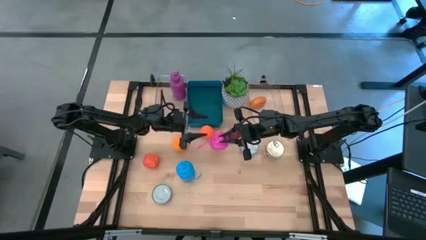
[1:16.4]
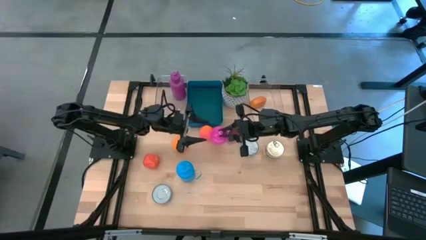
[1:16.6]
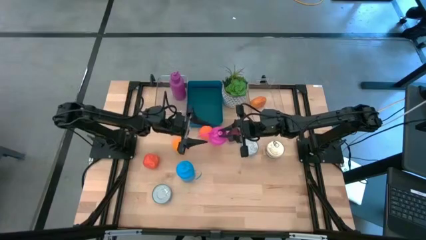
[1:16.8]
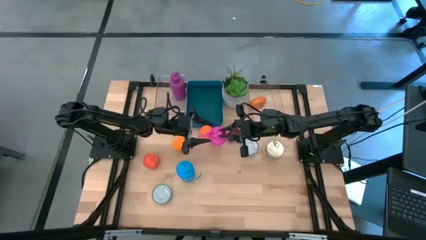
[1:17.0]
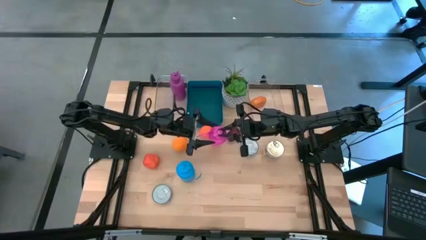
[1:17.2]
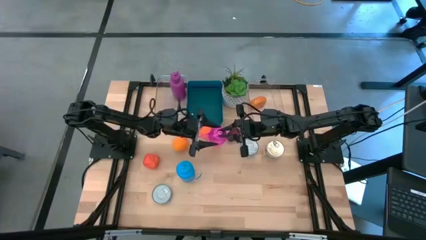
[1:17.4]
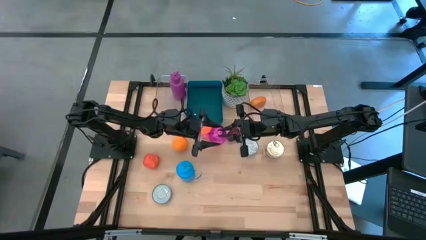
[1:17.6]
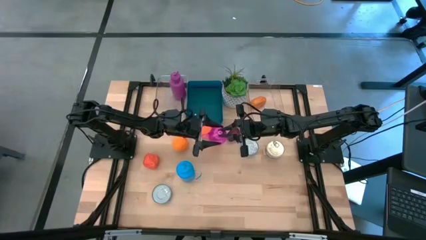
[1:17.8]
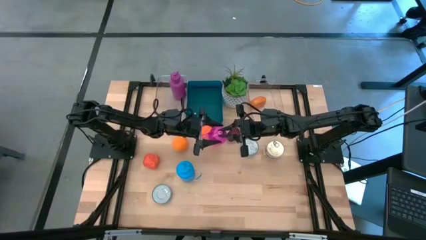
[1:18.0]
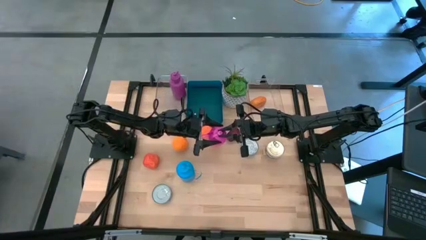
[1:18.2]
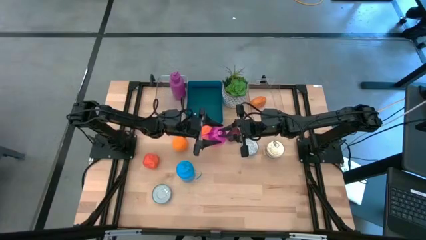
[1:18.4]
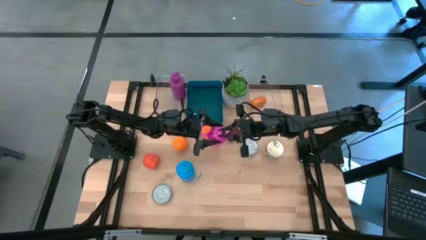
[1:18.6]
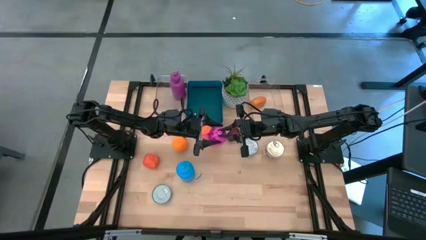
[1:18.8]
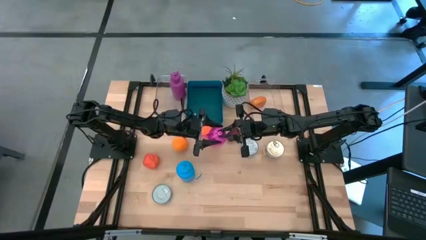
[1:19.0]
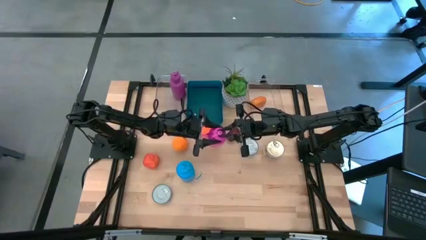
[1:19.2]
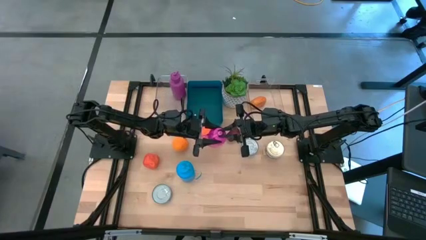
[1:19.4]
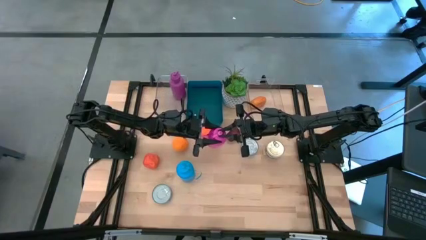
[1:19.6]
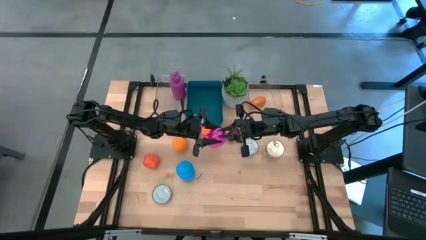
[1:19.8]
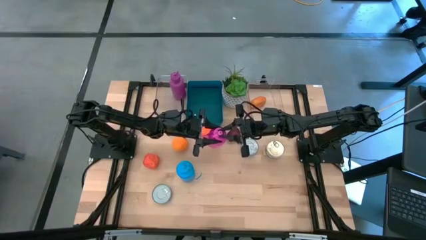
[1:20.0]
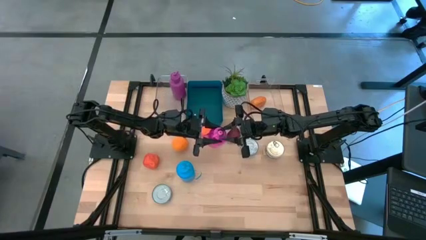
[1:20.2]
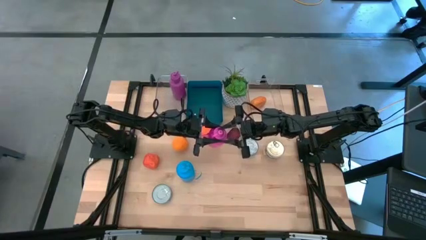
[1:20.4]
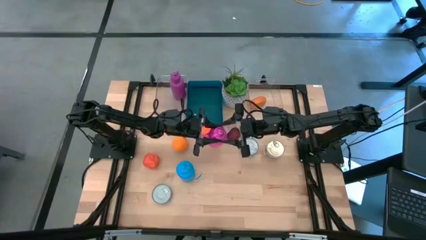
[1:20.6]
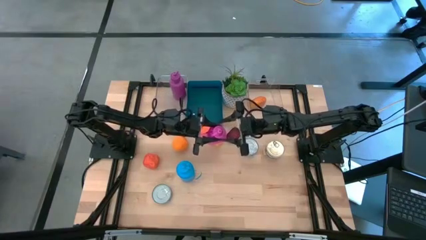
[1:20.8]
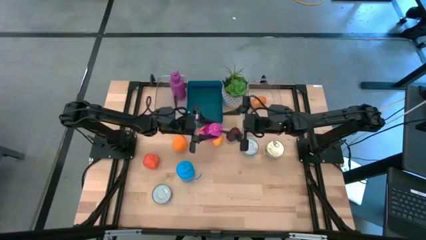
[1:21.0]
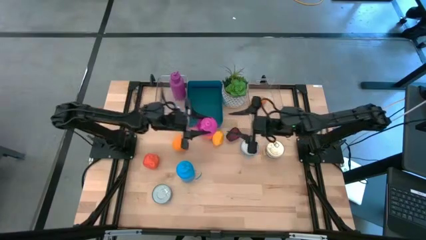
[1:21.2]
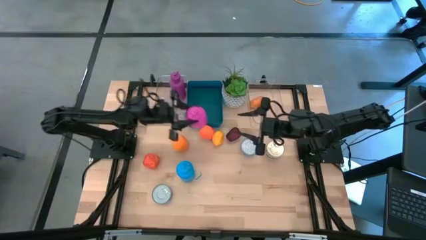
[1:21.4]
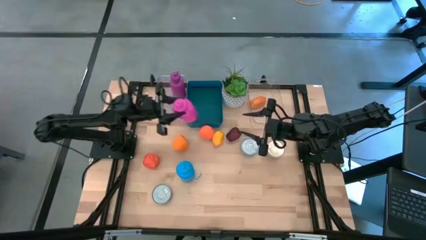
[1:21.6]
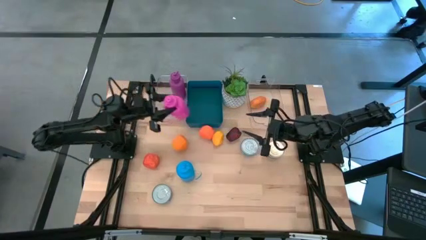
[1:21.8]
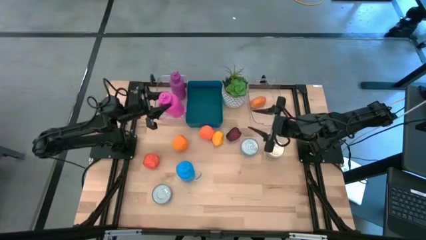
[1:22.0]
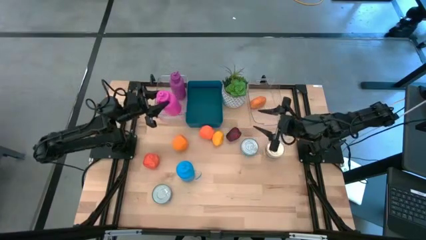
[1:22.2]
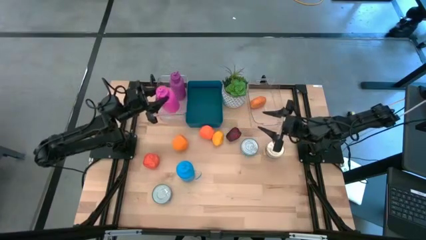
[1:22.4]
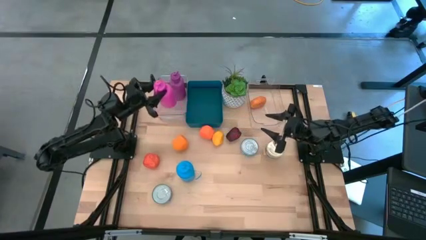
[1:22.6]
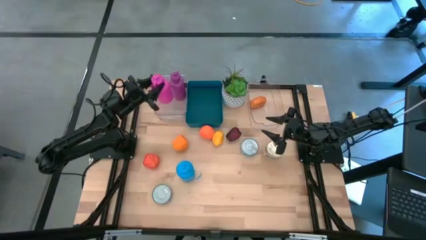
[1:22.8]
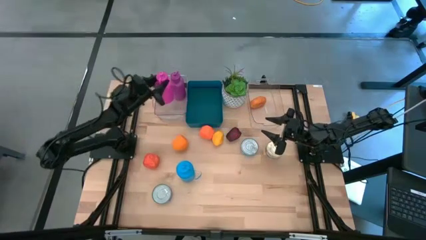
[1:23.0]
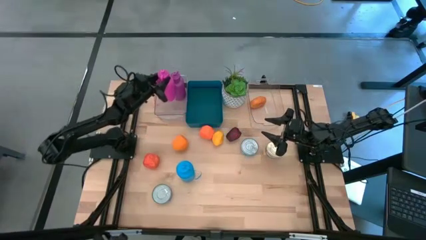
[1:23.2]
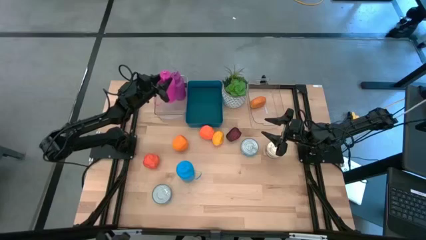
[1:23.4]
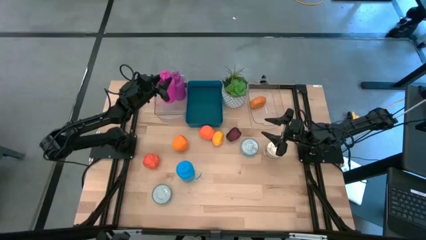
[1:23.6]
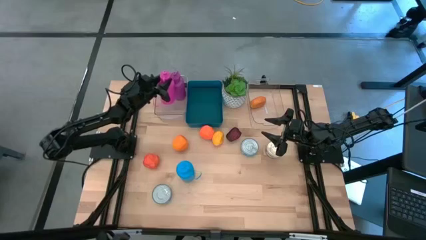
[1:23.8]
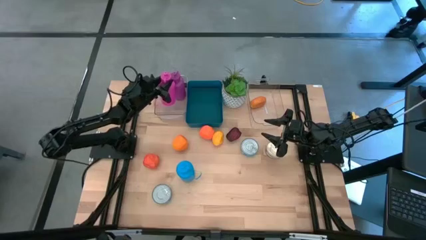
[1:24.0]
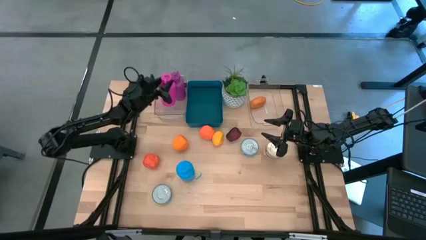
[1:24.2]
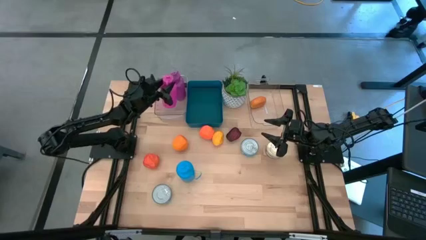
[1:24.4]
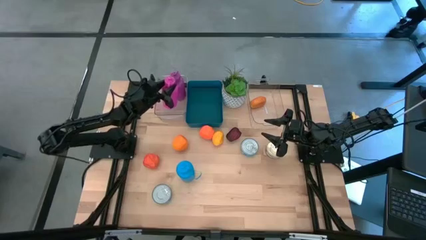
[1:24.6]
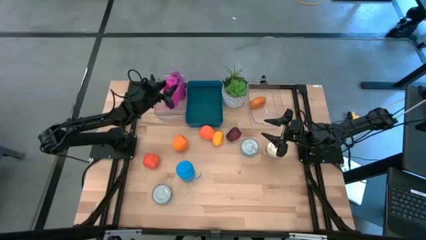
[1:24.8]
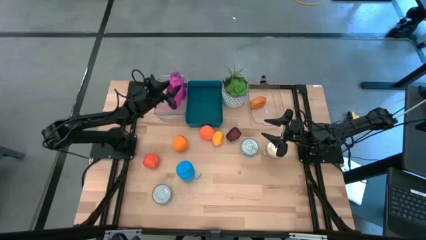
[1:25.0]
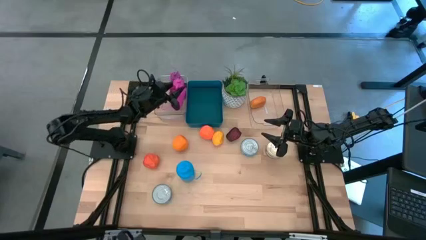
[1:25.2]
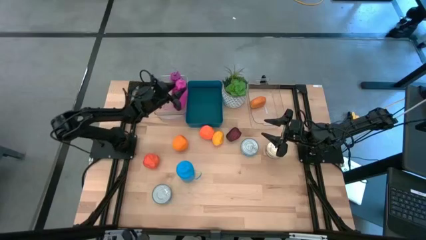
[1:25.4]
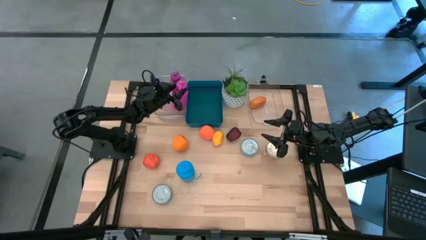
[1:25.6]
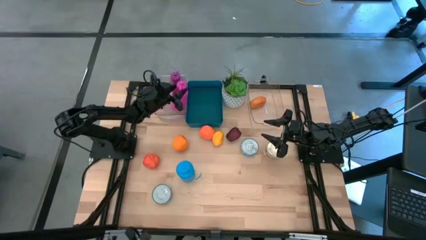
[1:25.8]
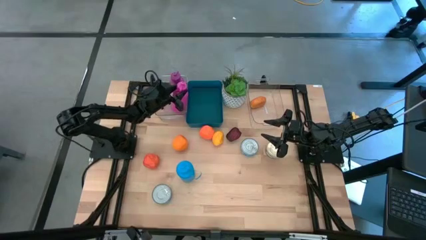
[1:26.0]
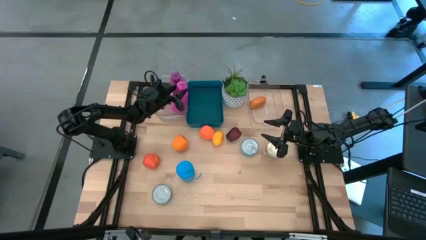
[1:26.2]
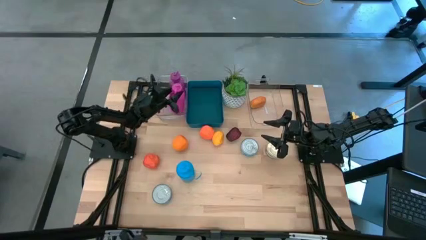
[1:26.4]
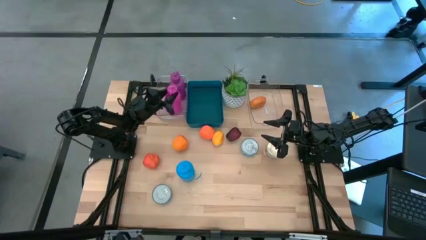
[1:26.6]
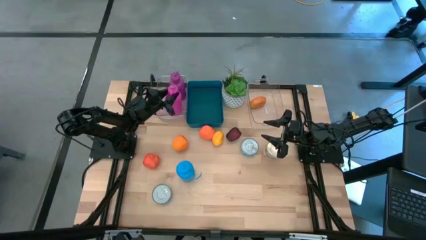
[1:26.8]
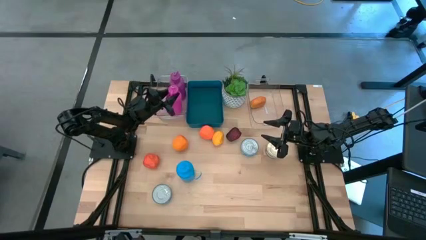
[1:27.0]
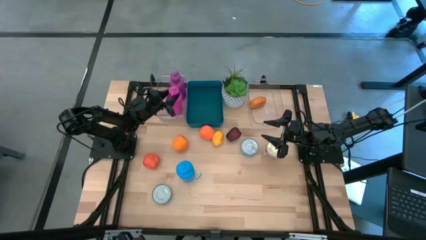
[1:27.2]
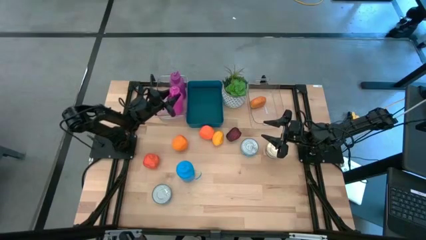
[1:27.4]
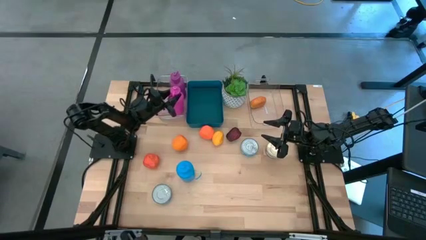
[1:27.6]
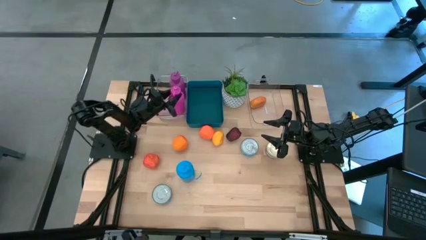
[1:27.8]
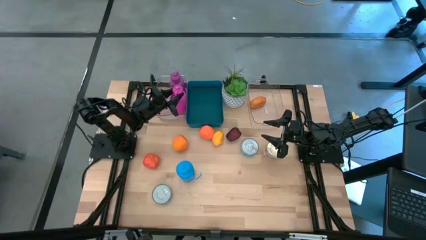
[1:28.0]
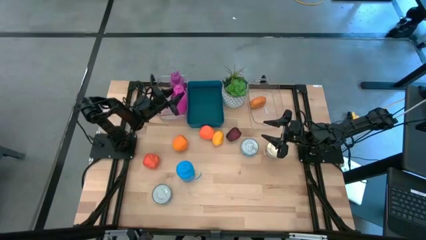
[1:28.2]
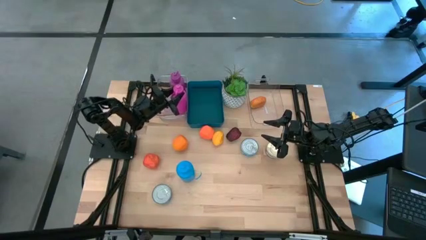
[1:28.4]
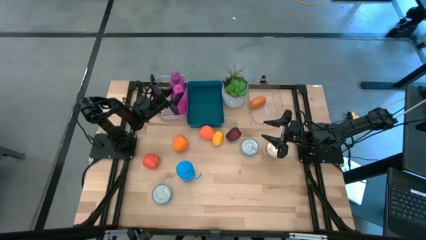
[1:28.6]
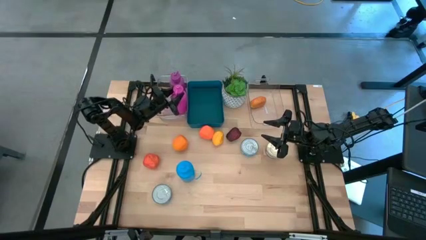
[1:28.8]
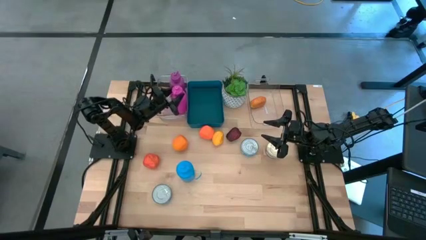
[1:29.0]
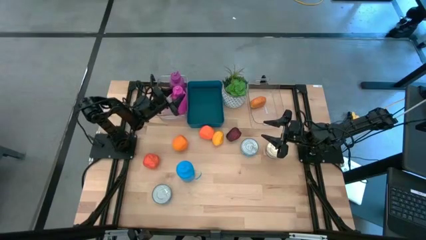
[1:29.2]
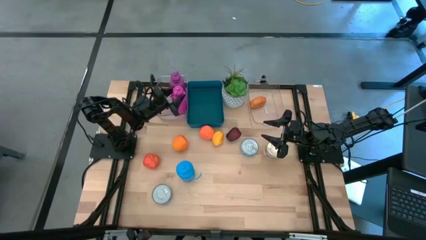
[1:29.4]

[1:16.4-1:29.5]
Task: Pick & Place Food Item
Put the pink water bottle into the left transparent bin

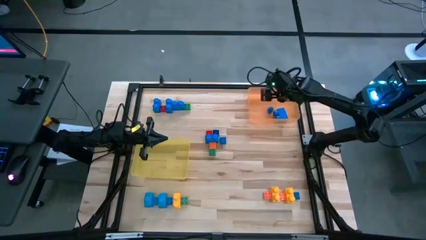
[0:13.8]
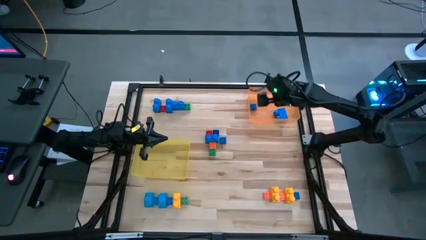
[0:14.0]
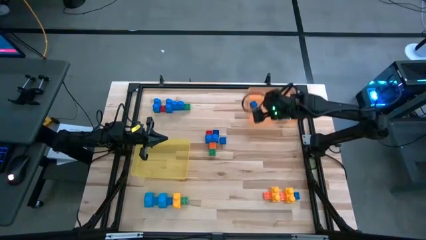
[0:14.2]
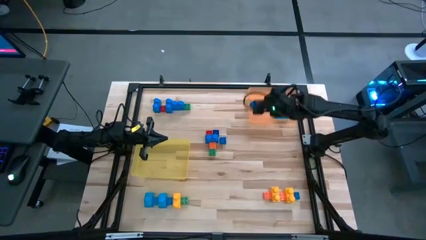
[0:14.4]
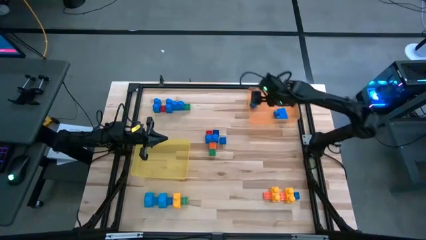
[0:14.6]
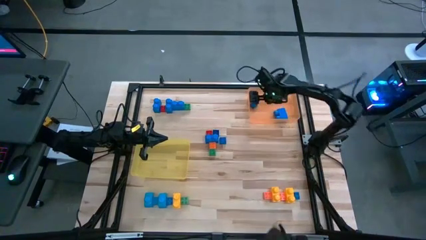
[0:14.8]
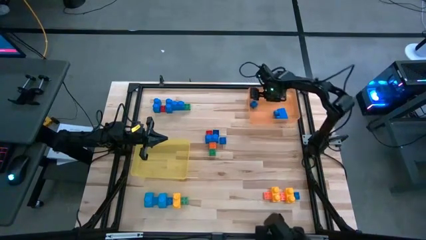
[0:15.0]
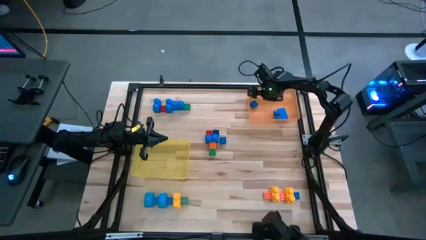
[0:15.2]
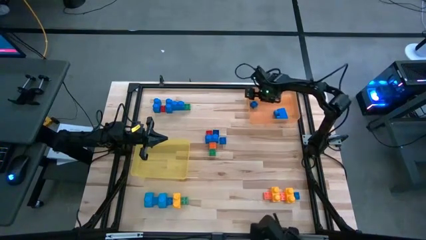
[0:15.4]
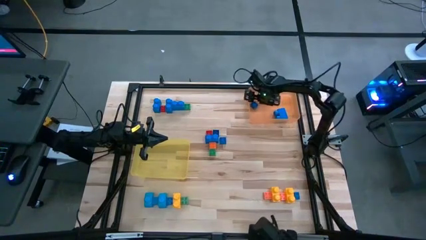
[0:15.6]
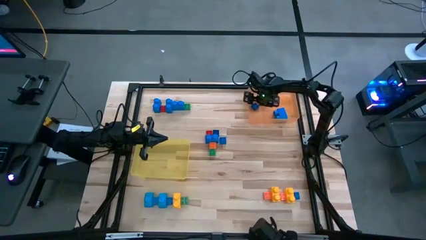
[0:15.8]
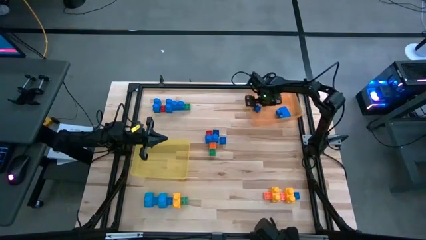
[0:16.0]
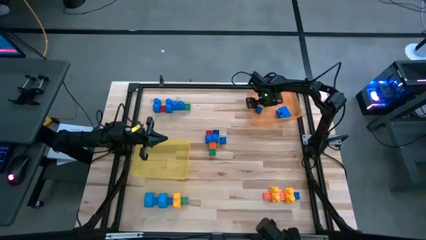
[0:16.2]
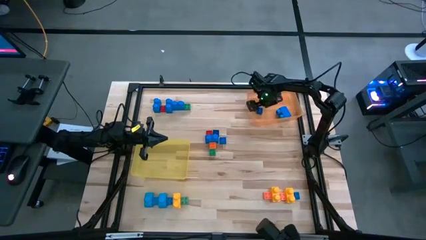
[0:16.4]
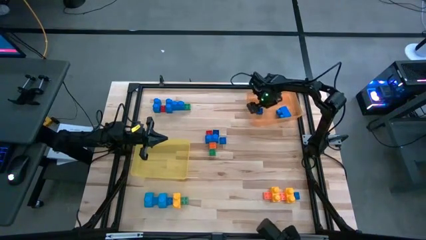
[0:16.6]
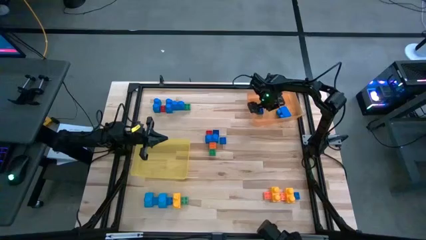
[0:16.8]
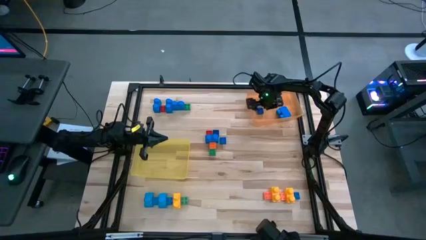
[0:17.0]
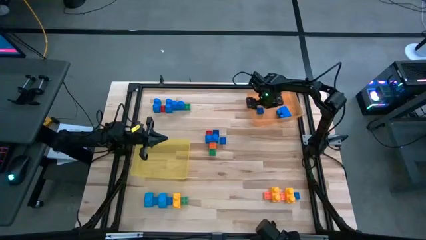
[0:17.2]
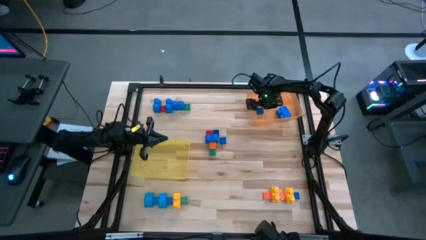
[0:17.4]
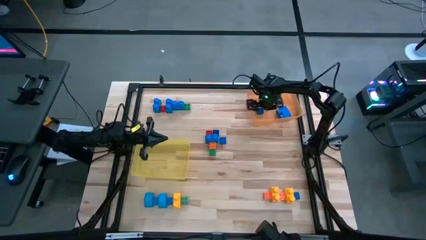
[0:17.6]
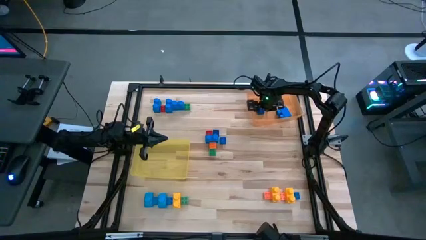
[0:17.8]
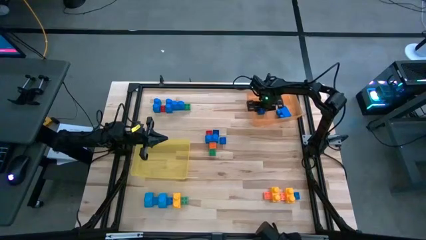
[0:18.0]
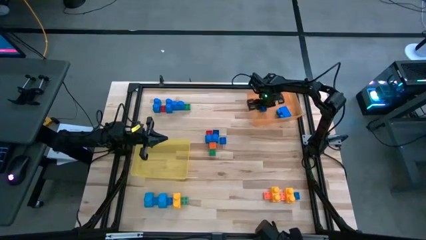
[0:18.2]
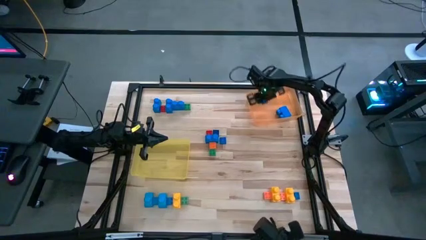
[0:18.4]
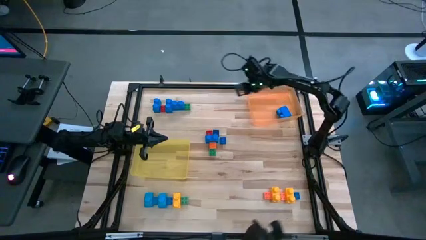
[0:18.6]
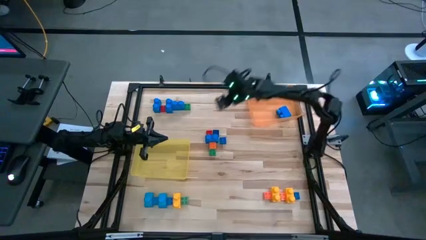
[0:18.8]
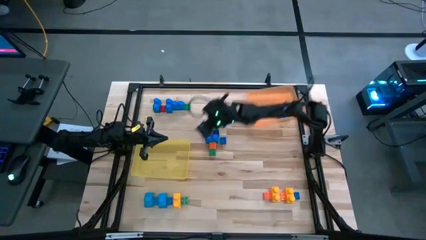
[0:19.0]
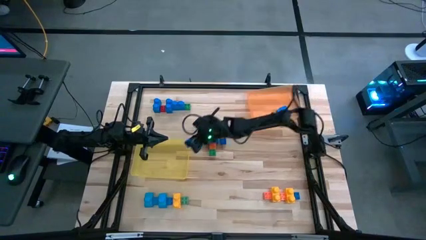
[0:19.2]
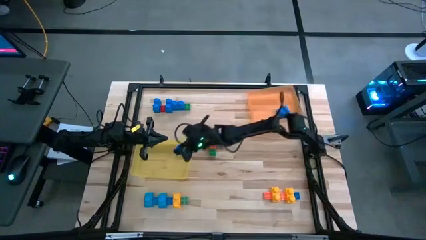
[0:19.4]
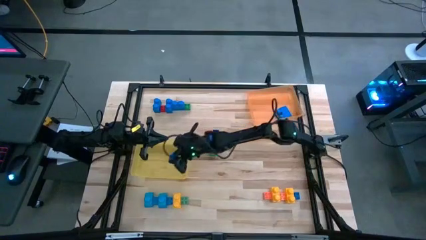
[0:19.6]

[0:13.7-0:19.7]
Task: Sort blocks by size
Put the small blue 4 stud game piece into the yellow bin
